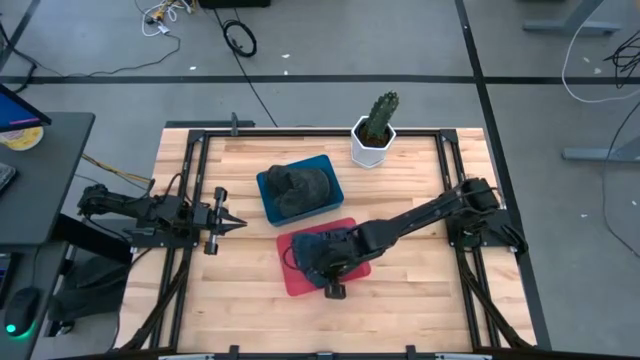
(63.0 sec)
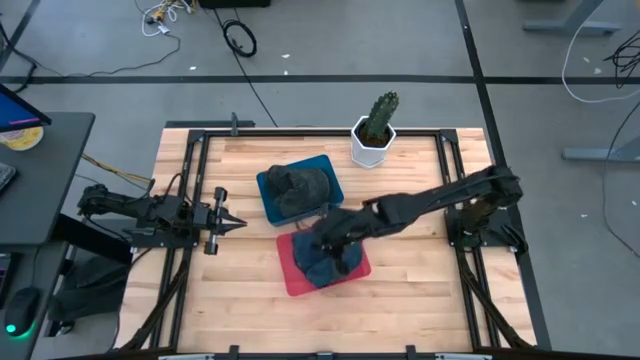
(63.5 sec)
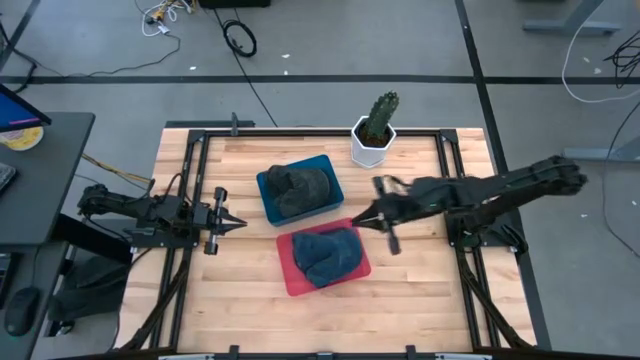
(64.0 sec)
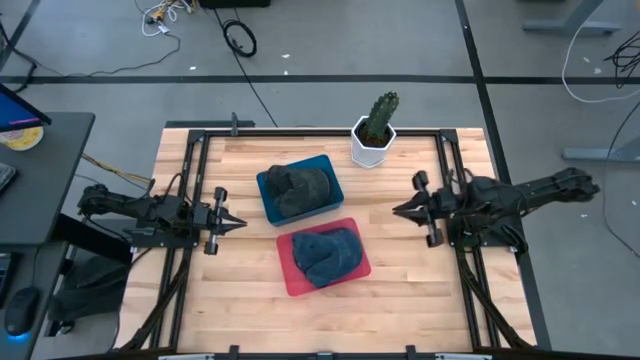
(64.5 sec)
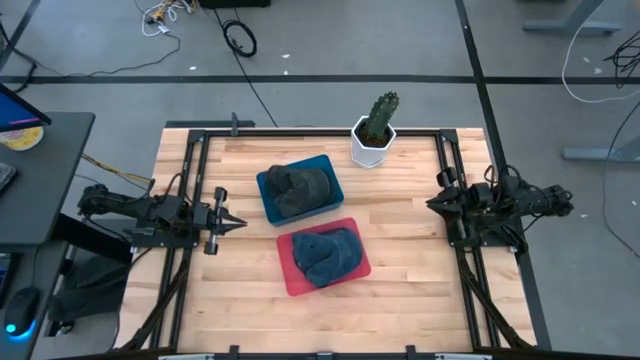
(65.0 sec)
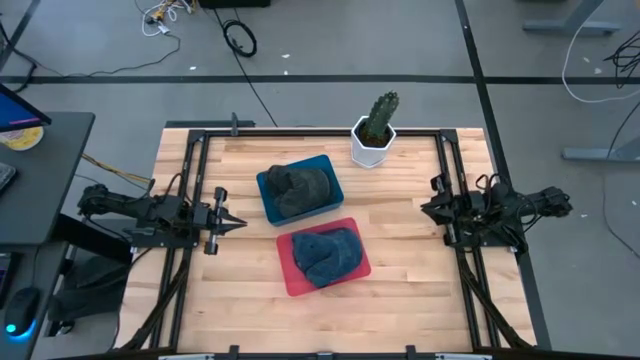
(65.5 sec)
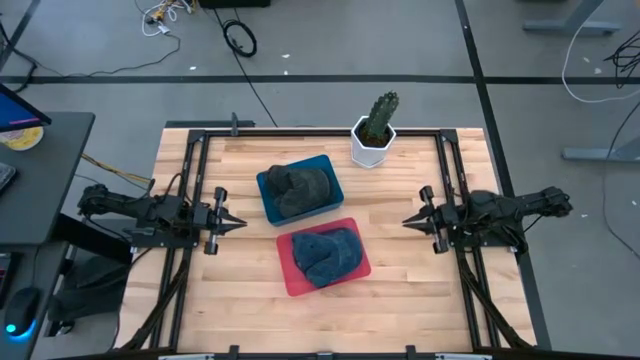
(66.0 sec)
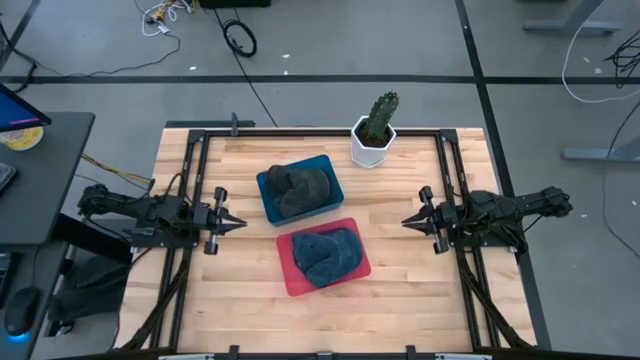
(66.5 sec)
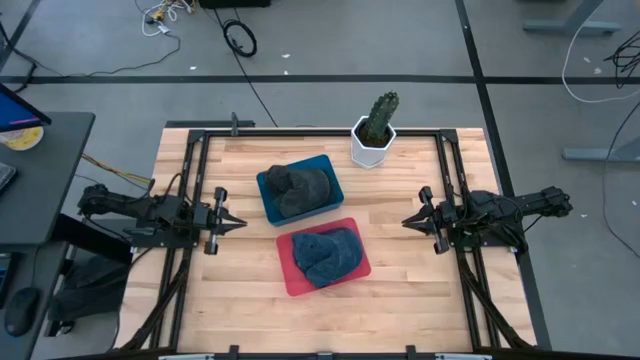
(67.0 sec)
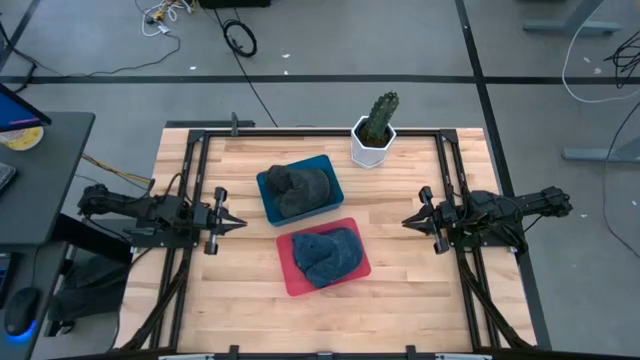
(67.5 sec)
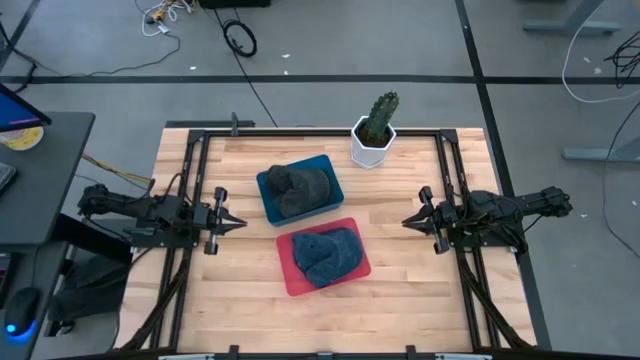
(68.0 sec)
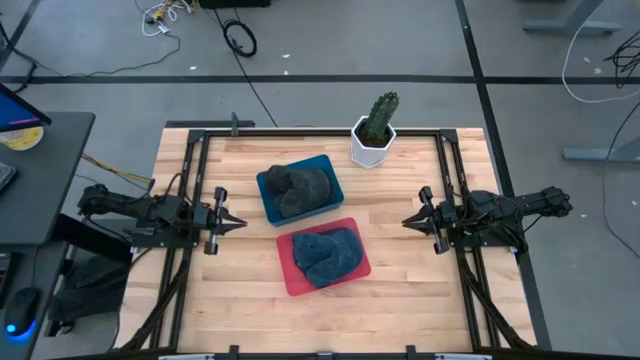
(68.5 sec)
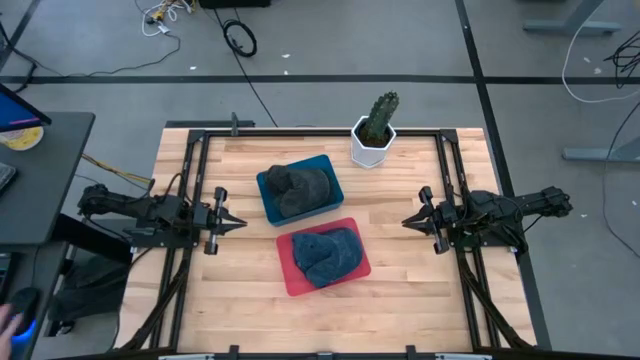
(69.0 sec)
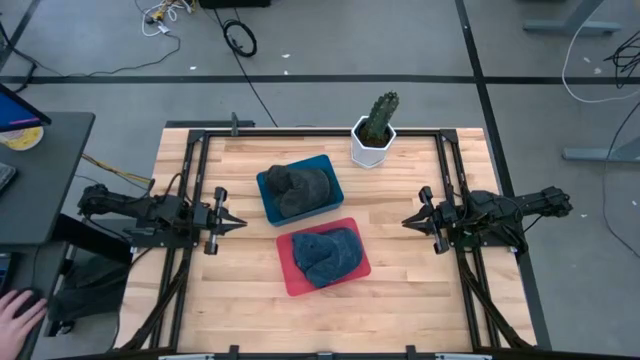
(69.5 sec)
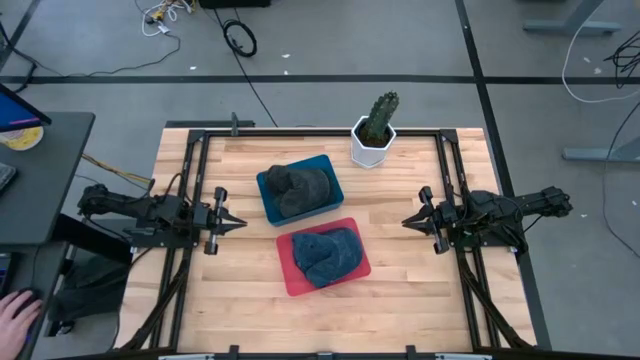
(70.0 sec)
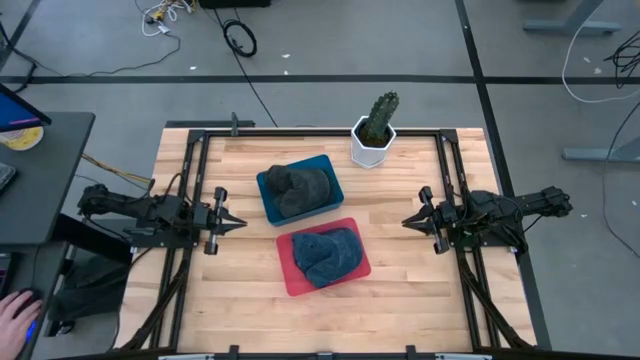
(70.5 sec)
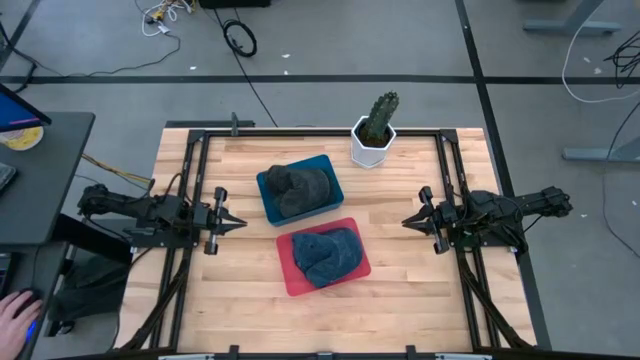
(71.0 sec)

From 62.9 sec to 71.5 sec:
Task: Pick & Place hat
Return to Home Position

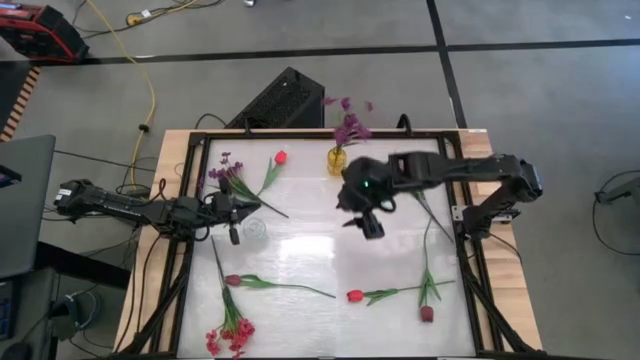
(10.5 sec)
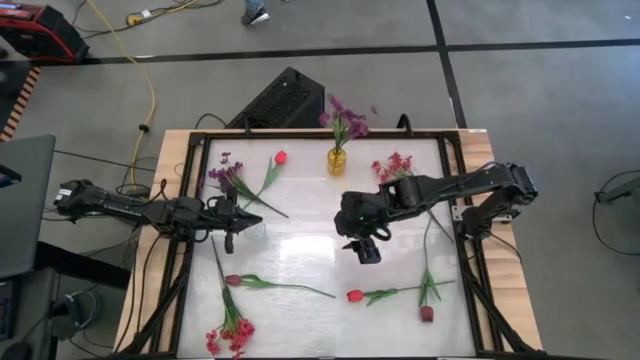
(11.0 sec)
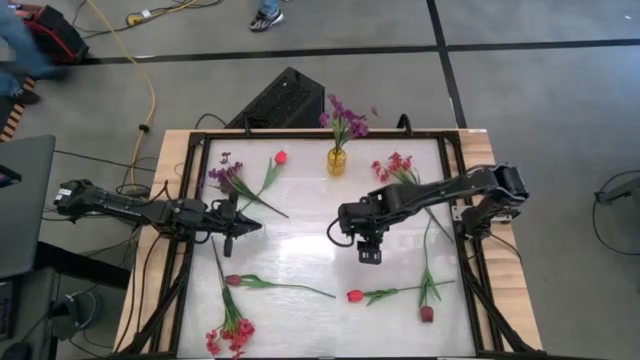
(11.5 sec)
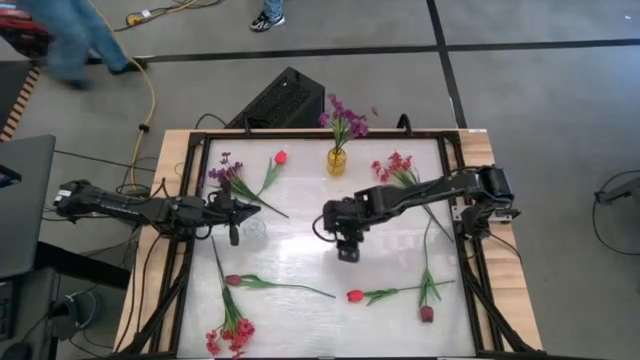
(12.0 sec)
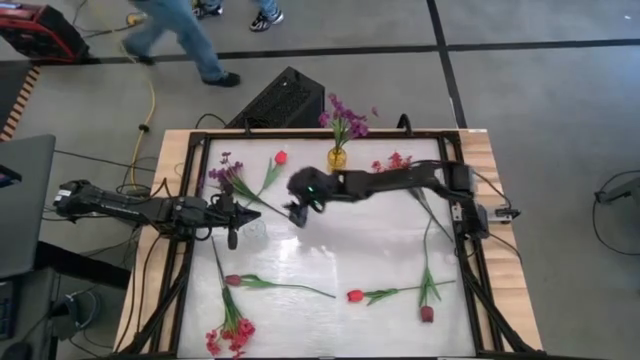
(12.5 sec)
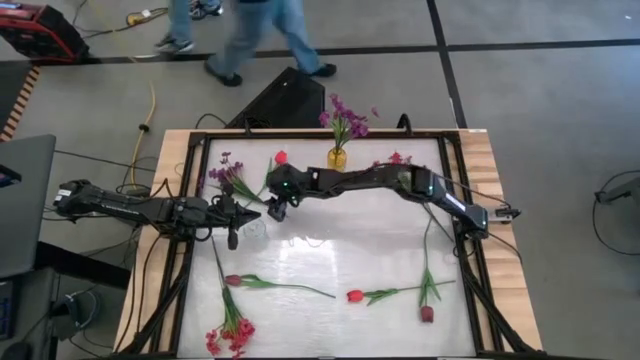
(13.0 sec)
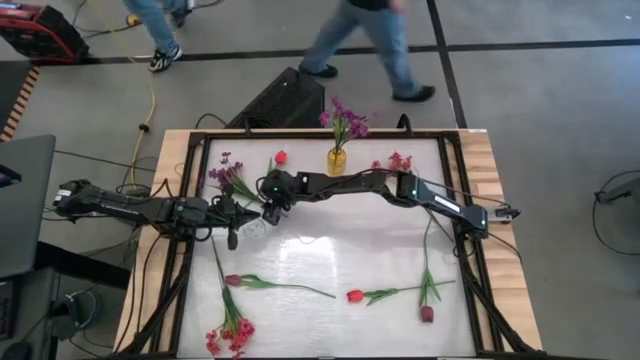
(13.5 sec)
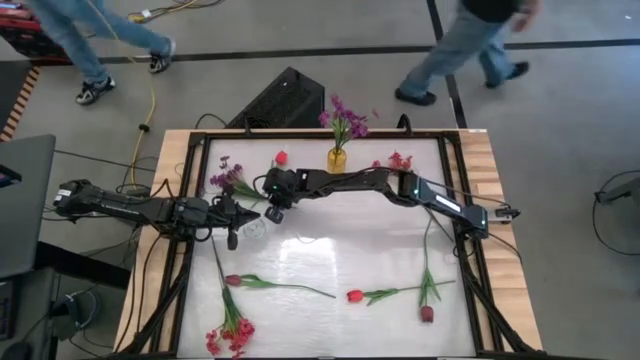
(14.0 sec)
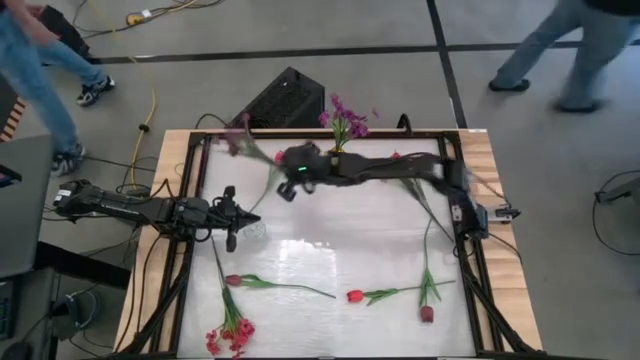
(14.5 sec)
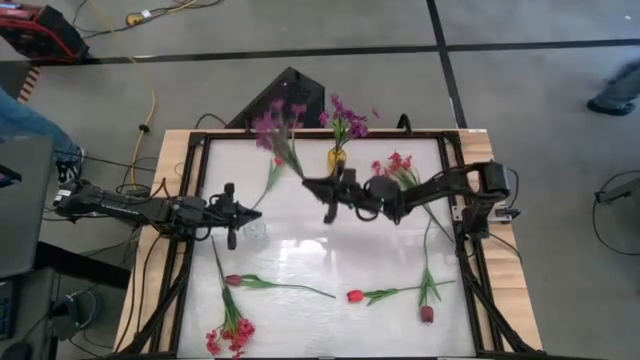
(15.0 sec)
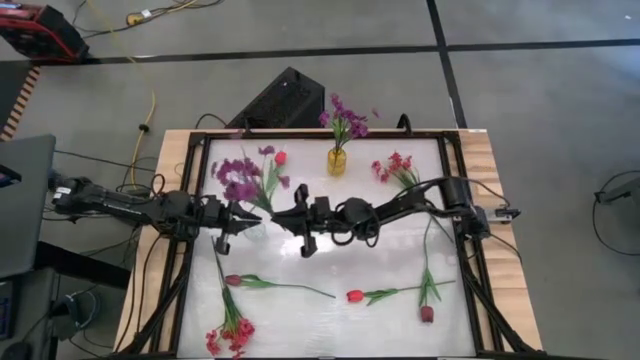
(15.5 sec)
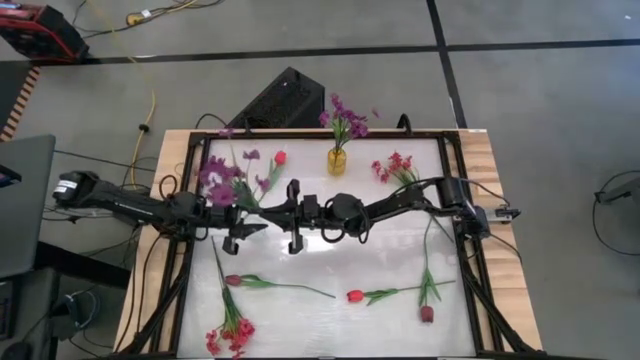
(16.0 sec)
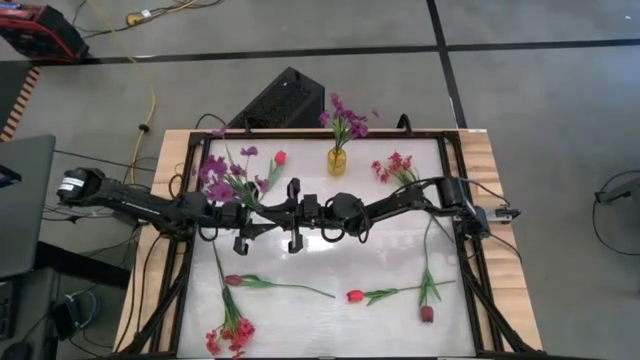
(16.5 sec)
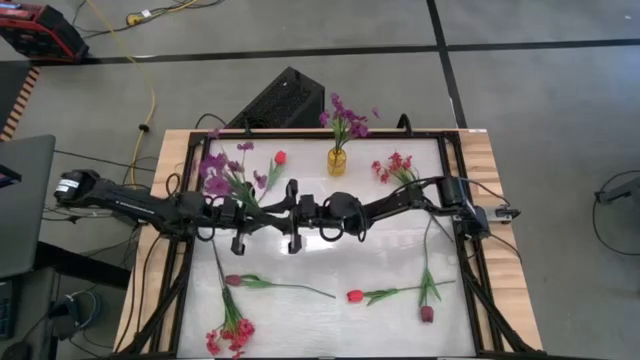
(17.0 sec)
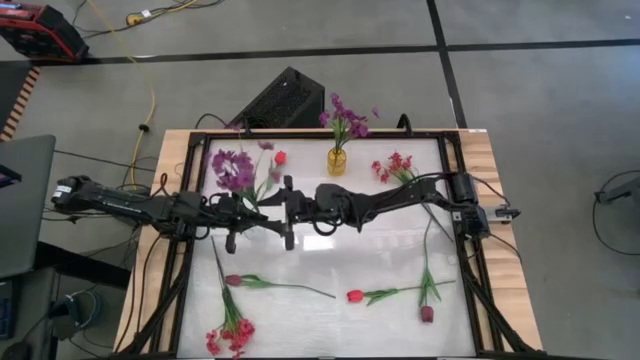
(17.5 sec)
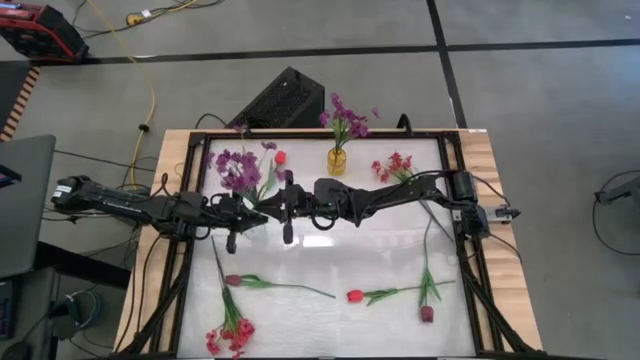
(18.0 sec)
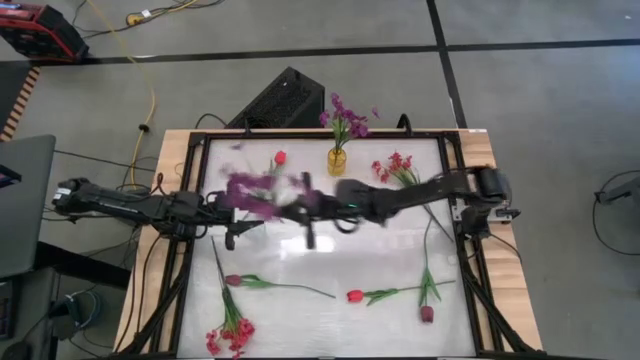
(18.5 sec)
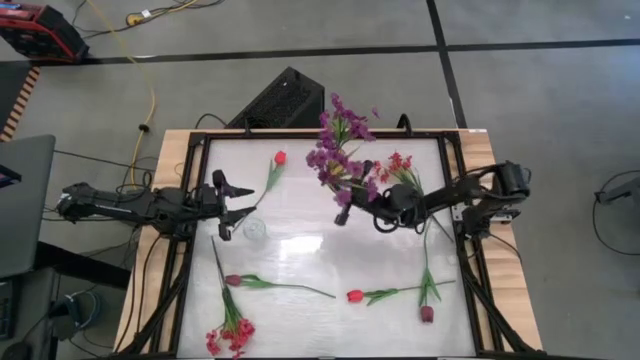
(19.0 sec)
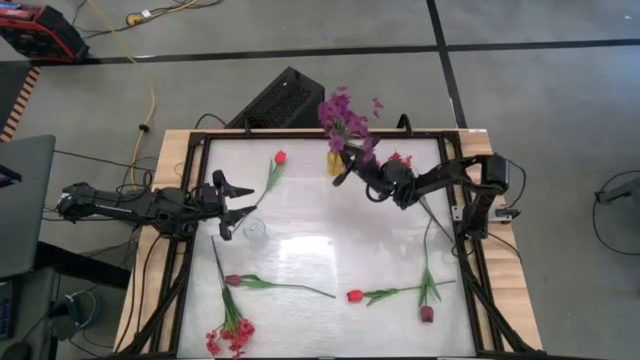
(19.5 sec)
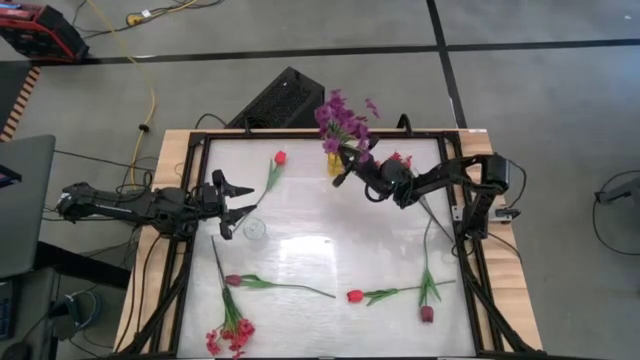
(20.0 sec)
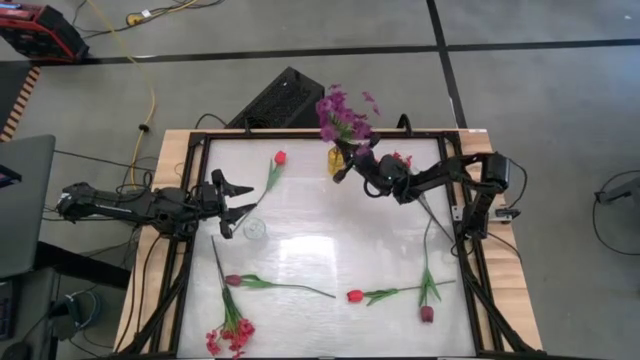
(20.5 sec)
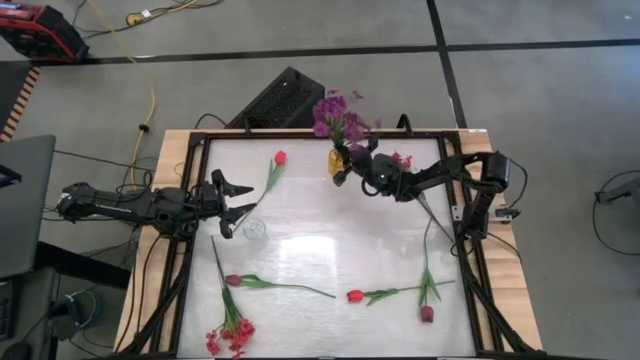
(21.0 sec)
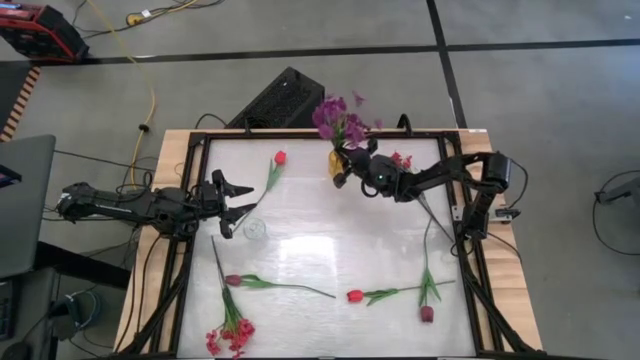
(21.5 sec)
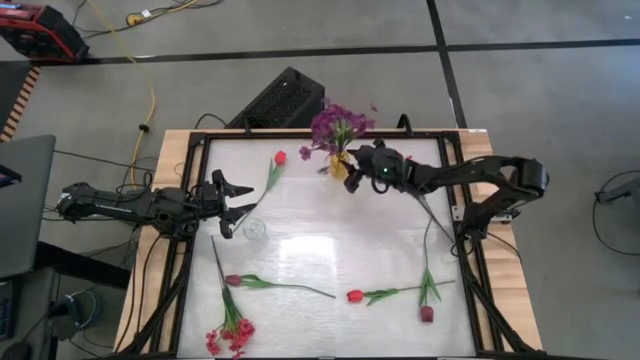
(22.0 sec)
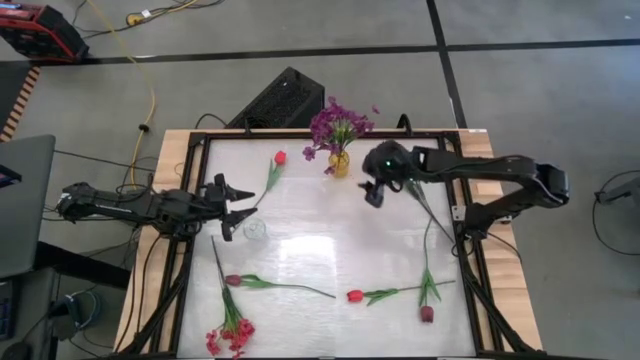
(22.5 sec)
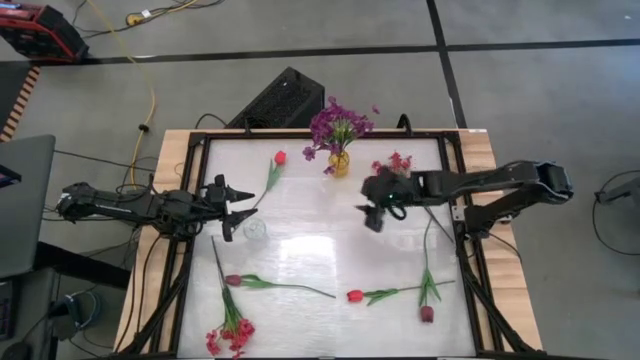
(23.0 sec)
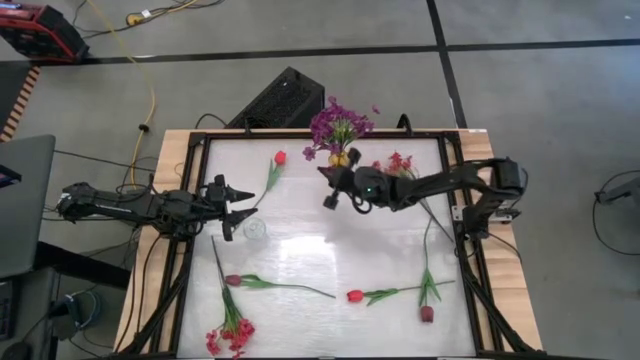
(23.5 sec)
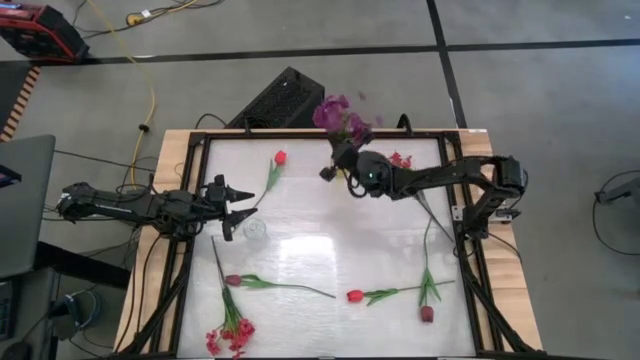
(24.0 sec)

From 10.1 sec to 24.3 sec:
Task: Sort flowers into vase by color
Put the violet flowers into the yellow vase
